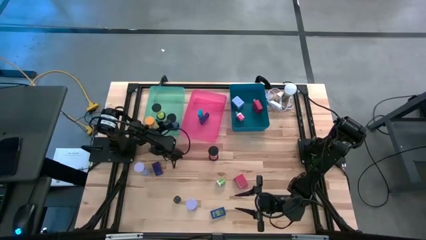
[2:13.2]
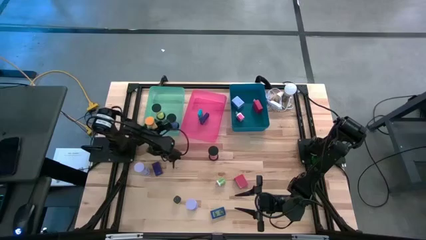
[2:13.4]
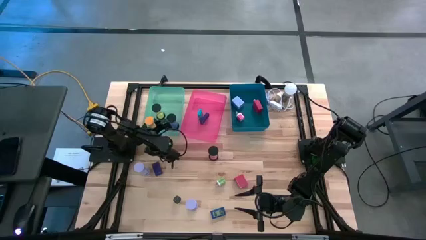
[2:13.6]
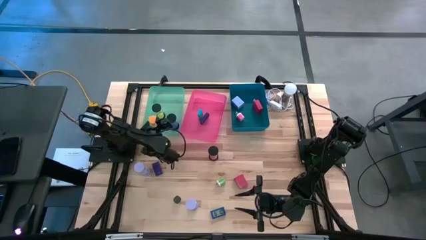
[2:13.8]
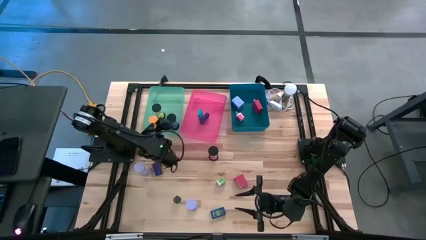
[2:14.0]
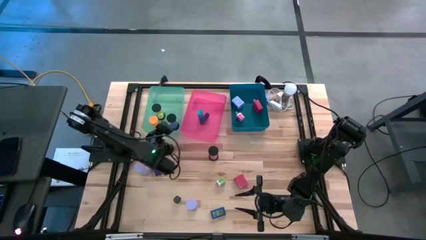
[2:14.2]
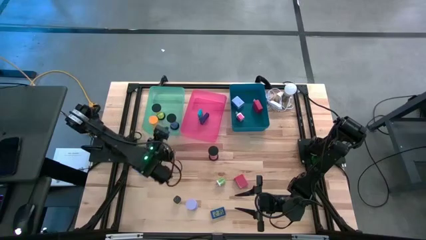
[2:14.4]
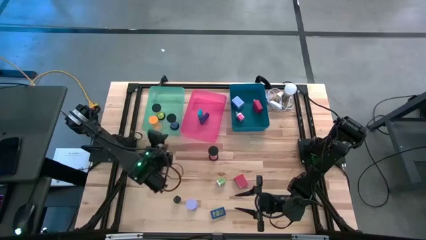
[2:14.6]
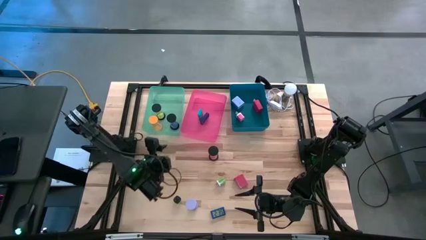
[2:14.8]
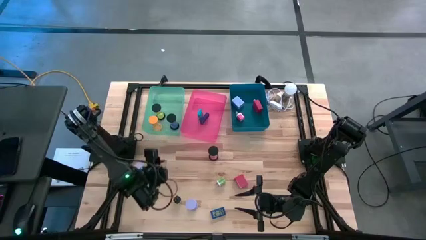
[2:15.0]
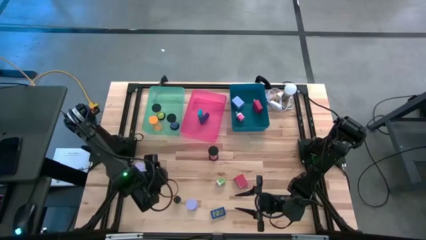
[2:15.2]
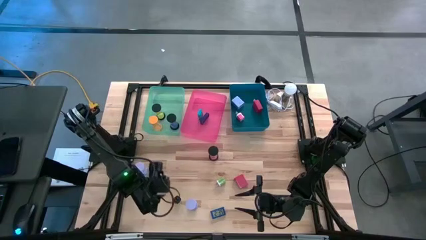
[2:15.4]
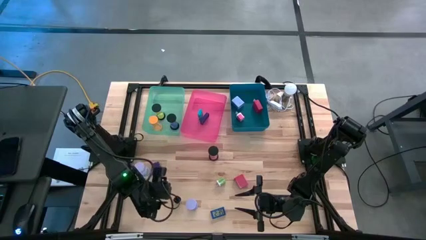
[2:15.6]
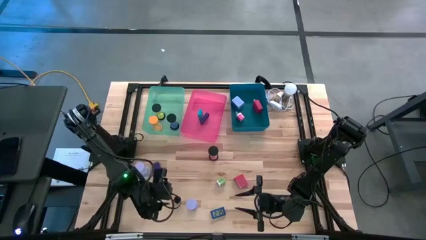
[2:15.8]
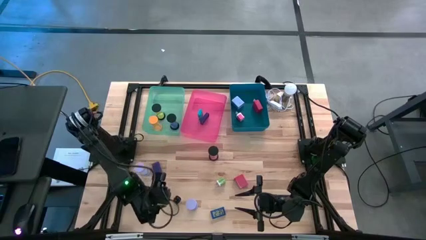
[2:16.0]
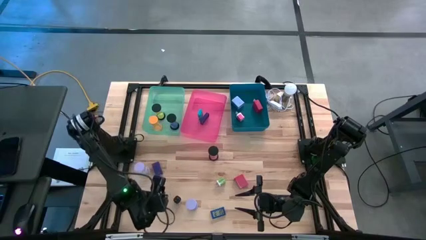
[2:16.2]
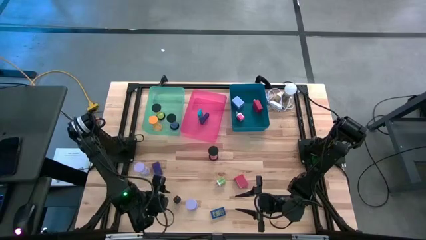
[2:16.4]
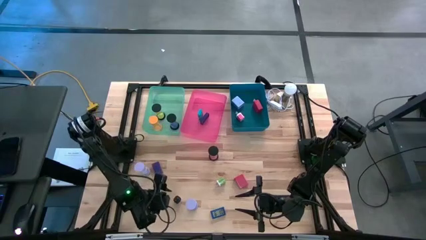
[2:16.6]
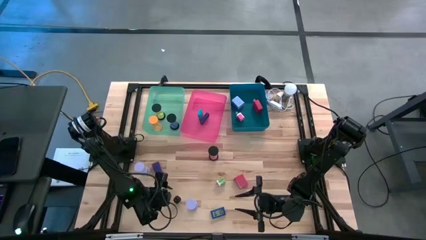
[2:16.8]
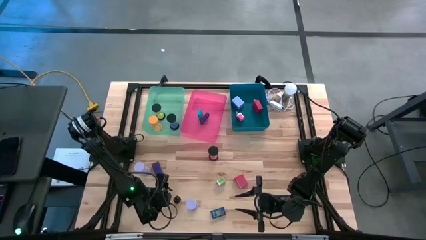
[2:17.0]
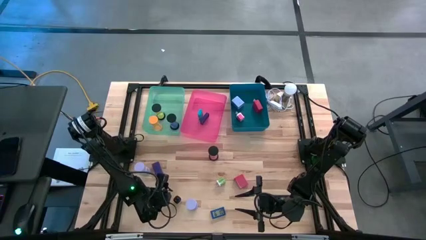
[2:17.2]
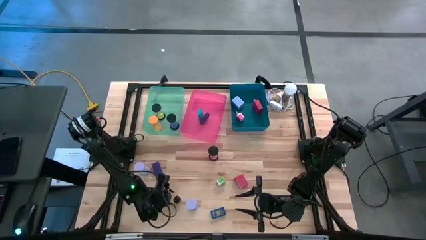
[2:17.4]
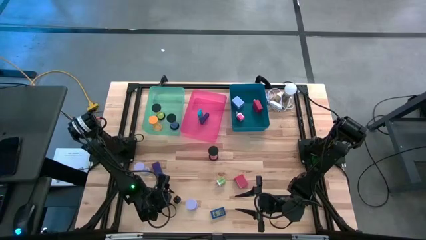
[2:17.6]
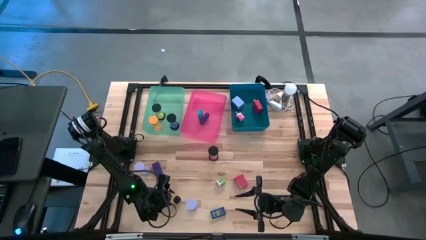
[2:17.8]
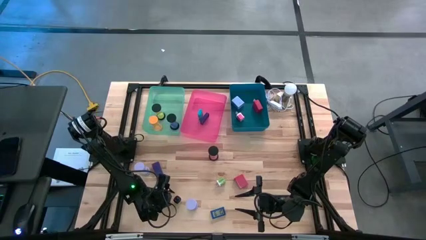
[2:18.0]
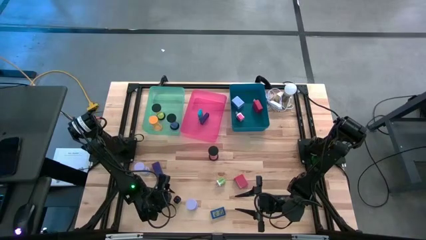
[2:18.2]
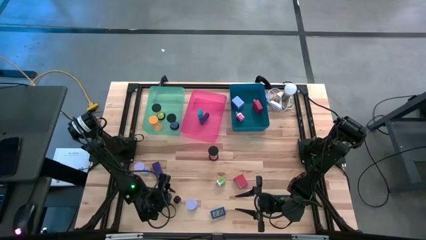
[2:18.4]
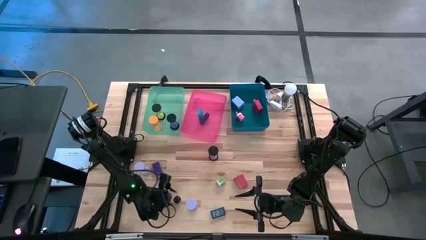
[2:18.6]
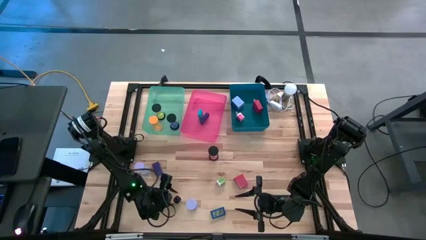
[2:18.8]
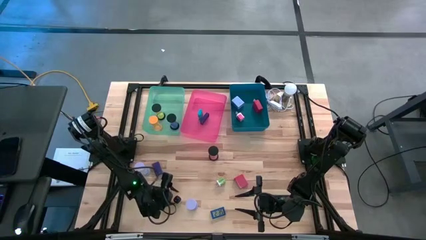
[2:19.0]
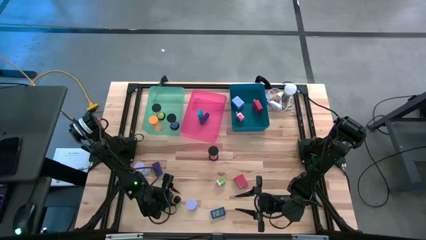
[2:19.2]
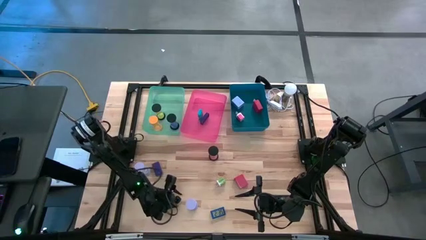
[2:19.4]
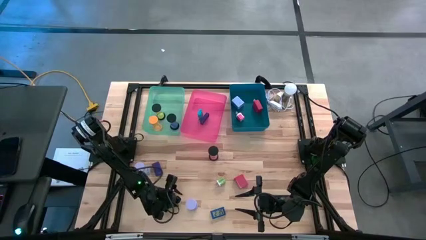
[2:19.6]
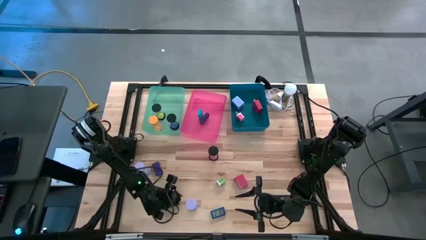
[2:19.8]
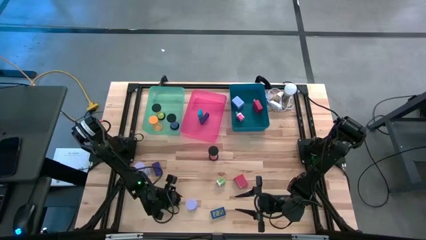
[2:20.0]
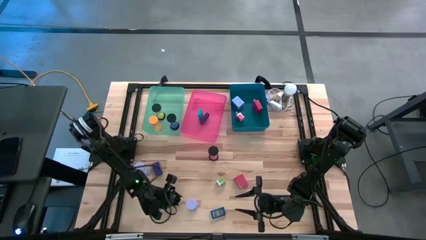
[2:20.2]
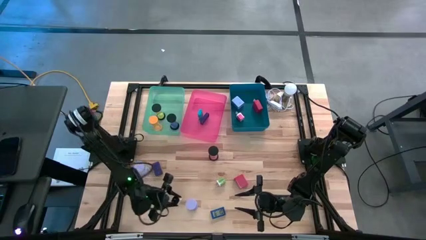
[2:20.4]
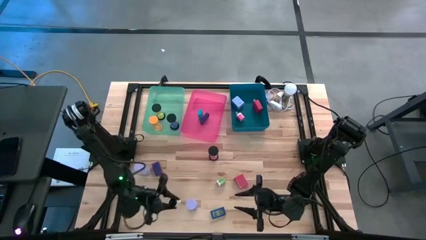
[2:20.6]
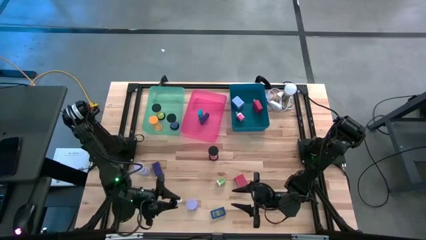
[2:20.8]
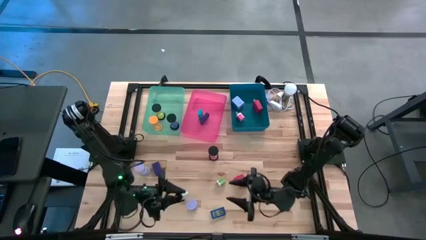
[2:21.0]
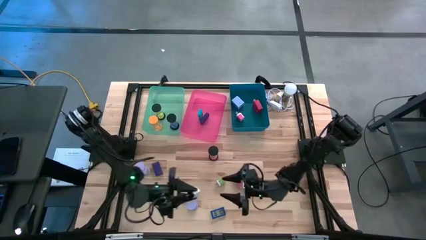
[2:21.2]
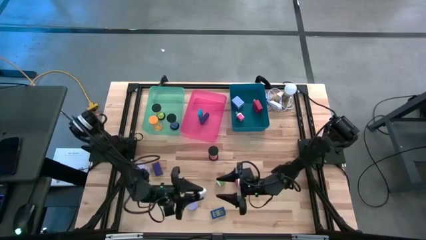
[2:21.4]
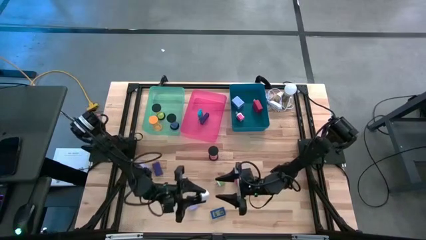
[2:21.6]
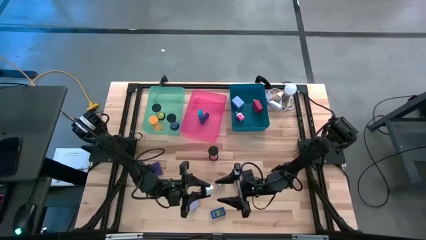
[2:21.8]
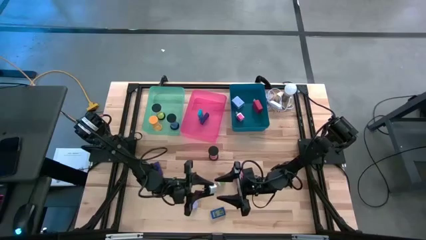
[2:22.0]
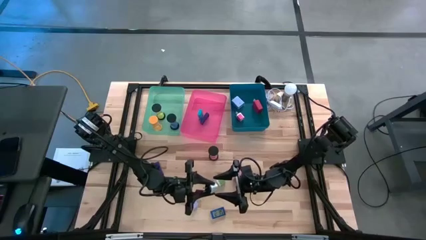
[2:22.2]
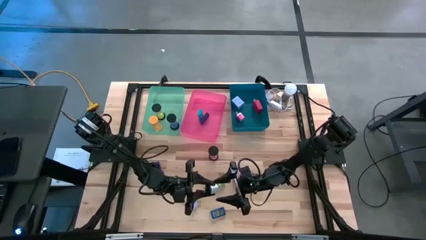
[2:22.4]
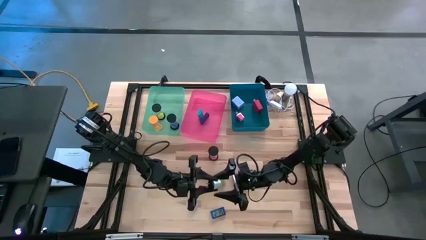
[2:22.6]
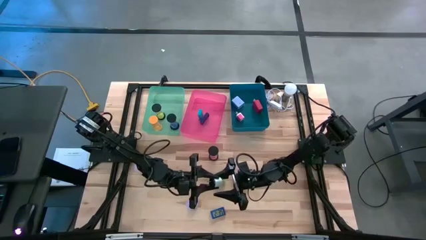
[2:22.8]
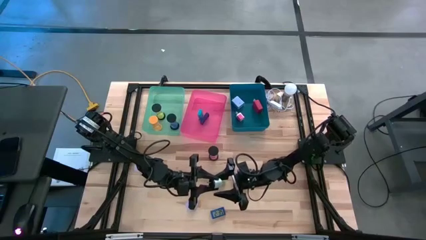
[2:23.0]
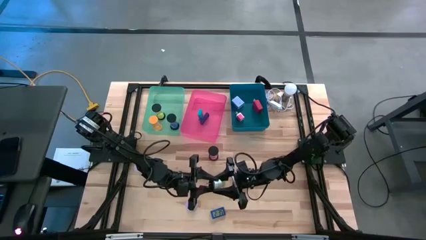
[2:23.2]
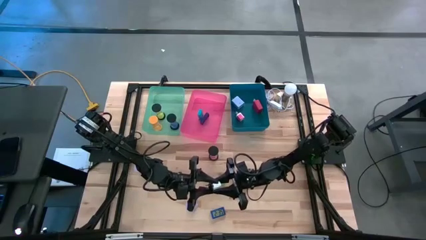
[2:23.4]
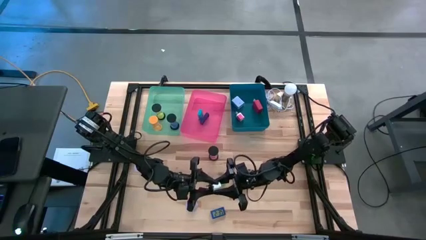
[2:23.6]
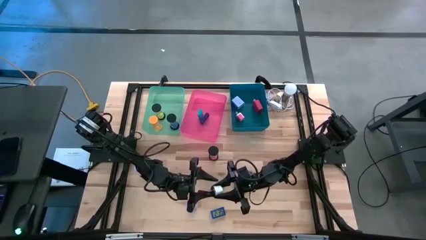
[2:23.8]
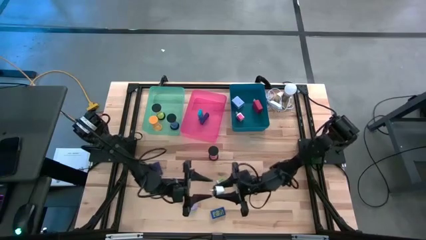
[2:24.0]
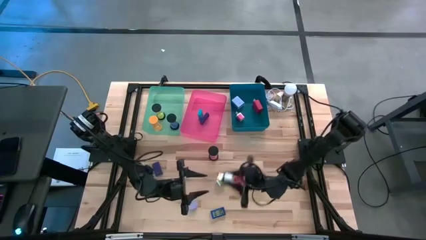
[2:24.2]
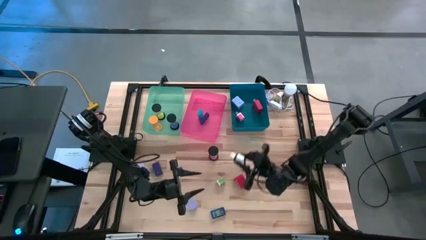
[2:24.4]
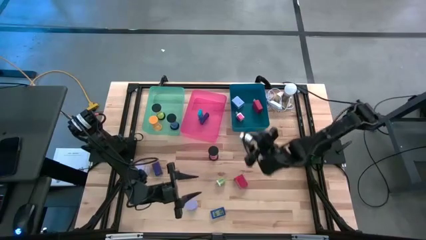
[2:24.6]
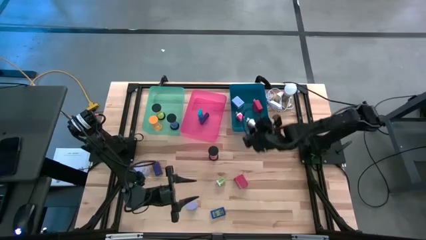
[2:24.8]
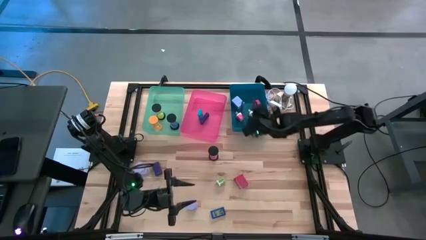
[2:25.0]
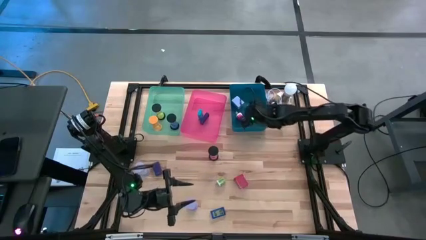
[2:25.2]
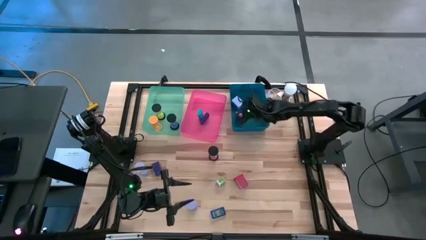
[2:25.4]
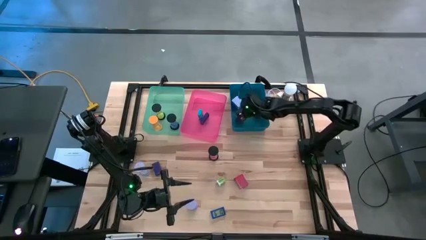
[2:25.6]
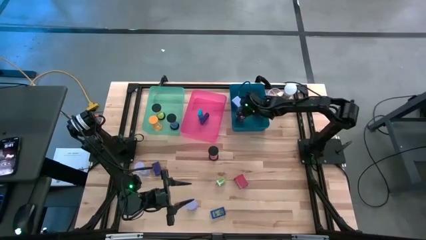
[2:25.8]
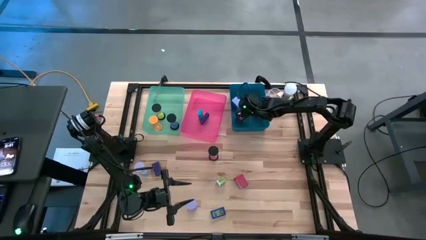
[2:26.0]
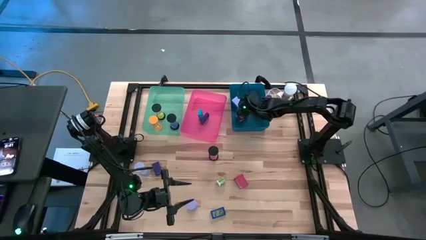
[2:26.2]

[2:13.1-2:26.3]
Task: Pick & Place Office items
Put the white charger adapter into the blue bin

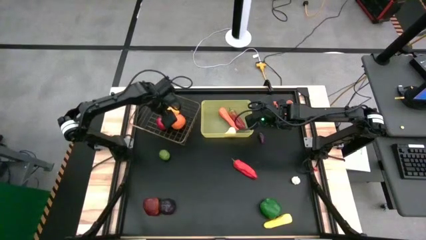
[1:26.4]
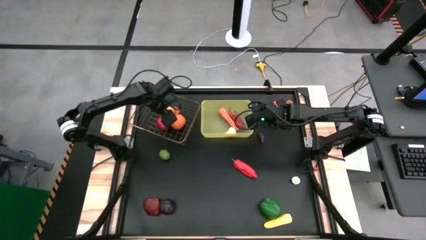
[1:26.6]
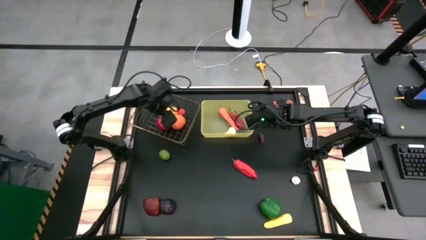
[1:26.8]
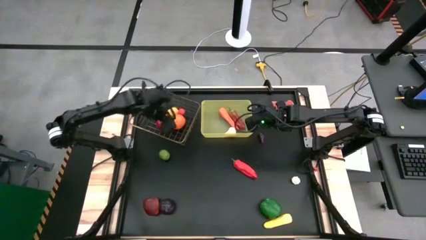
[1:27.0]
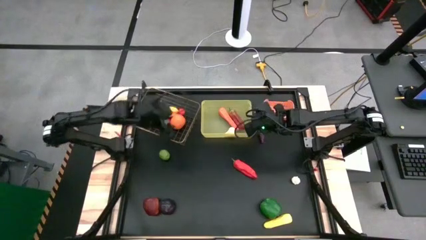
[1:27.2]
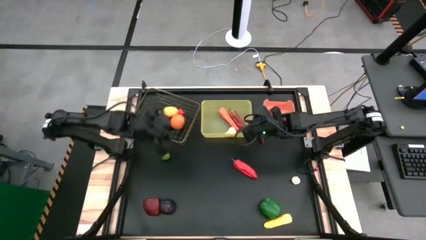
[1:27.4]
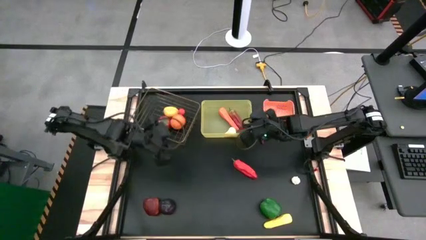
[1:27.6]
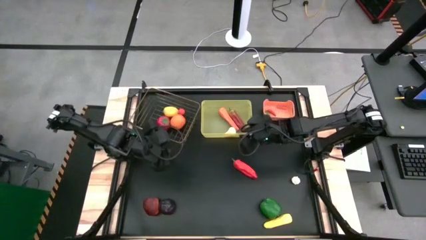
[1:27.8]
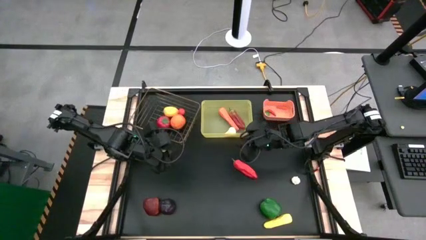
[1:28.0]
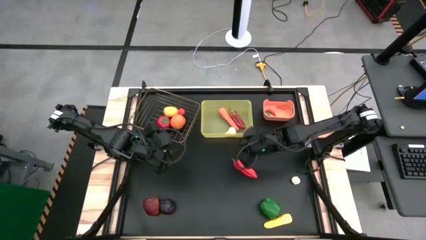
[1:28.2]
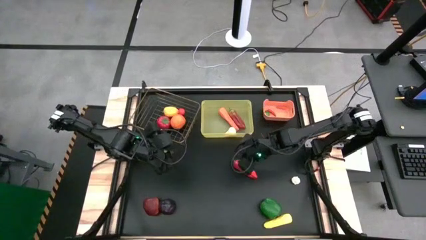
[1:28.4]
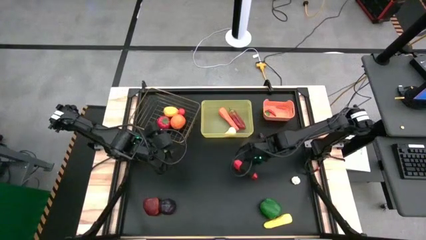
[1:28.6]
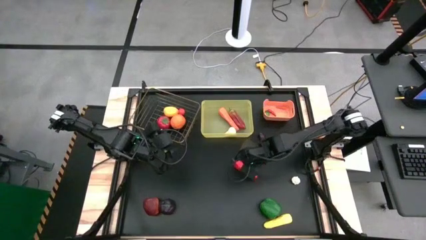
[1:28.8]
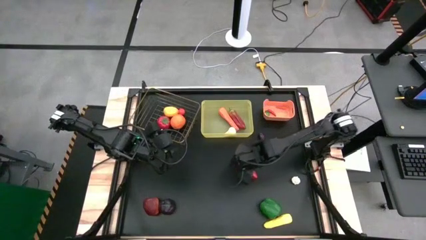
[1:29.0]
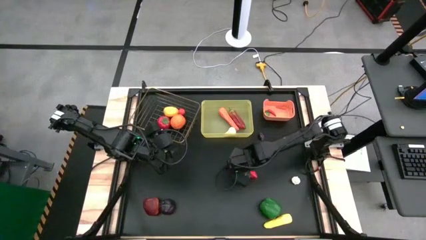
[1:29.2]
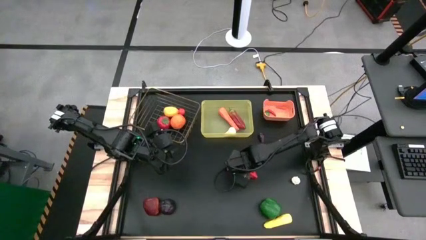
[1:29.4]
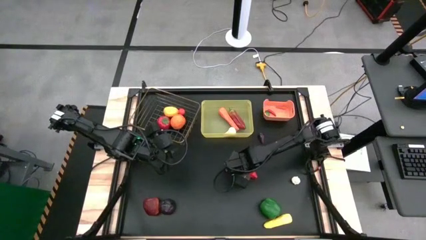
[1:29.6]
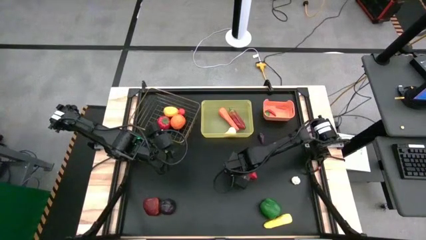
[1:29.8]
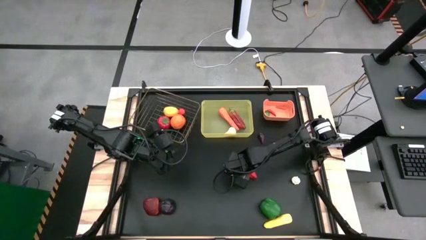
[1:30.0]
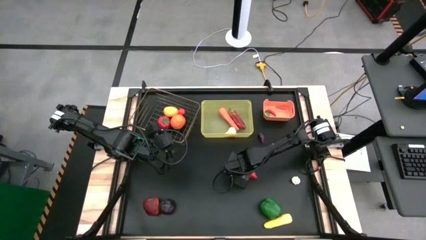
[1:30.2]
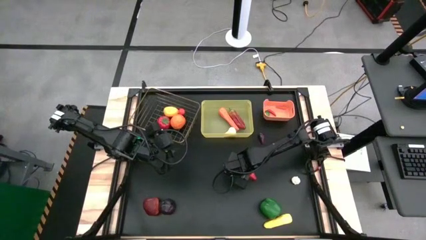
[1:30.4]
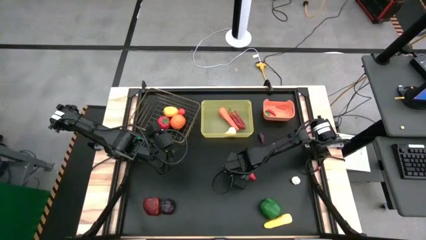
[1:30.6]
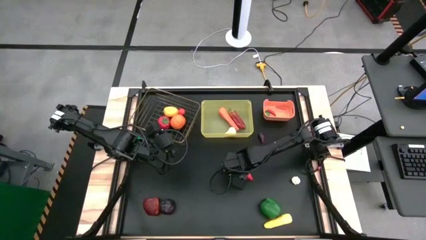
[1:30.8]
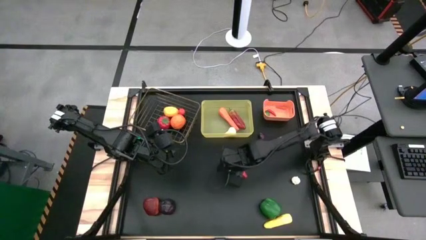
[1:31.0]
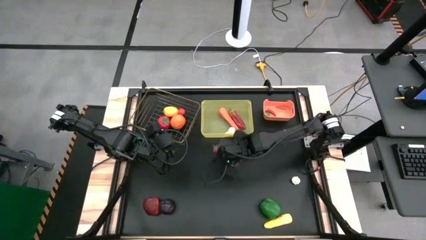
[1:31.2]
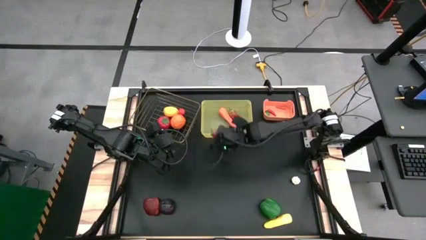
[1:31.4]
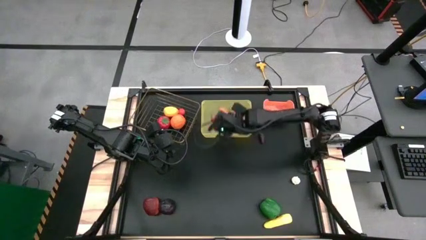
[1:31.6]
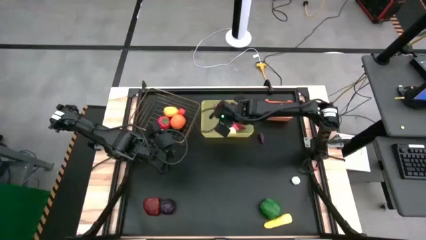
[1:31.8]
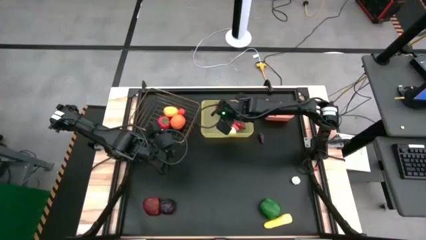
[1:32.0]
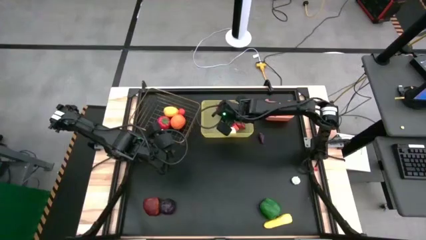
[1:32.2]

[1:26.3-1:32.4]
Task: Sort produce into baskets
Put the fresno pepper into the yellow bin
